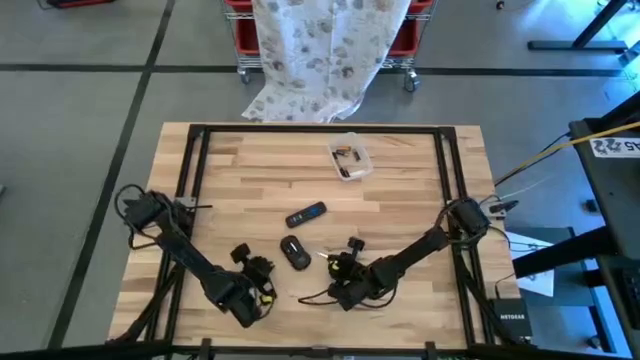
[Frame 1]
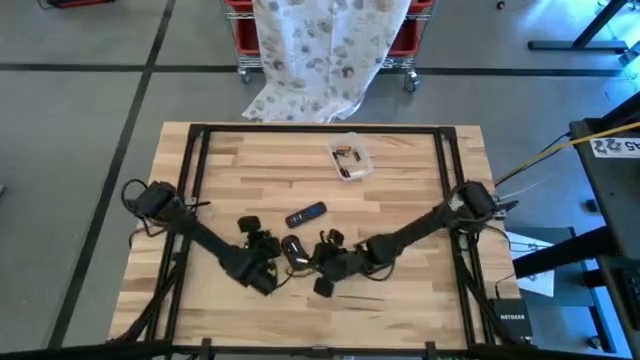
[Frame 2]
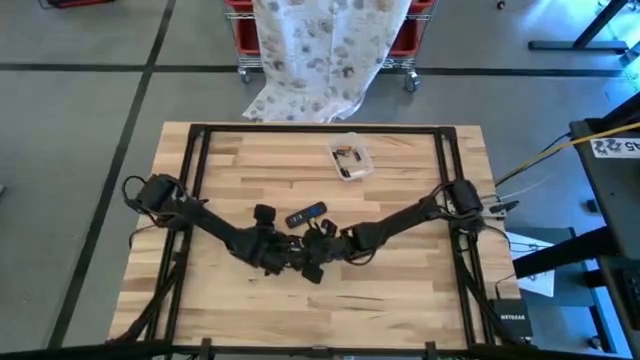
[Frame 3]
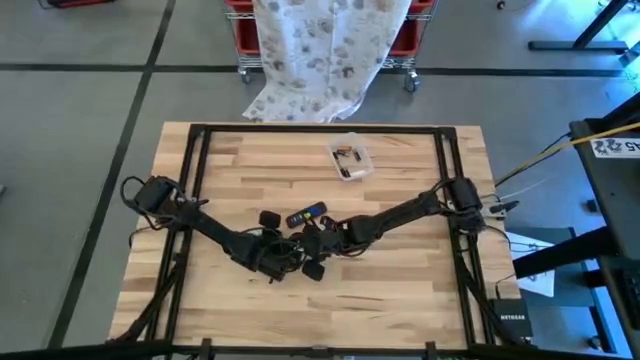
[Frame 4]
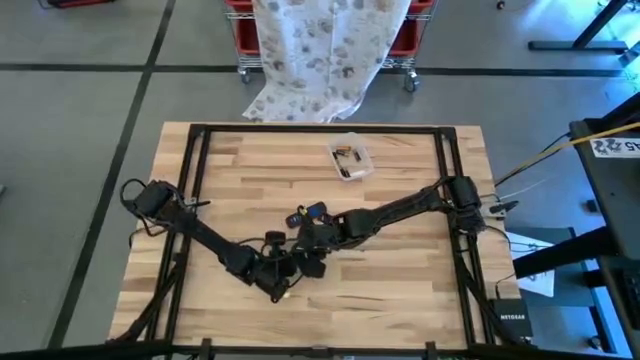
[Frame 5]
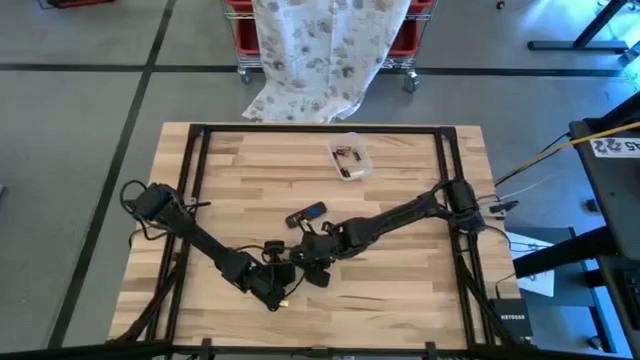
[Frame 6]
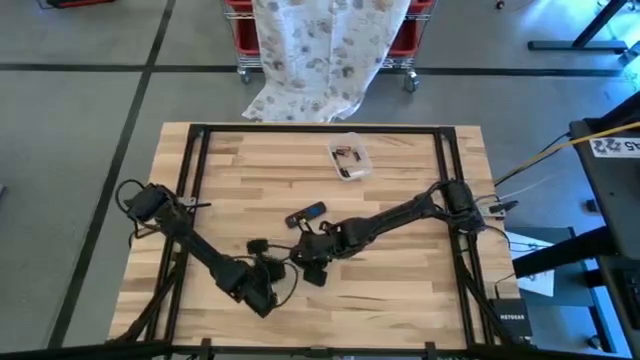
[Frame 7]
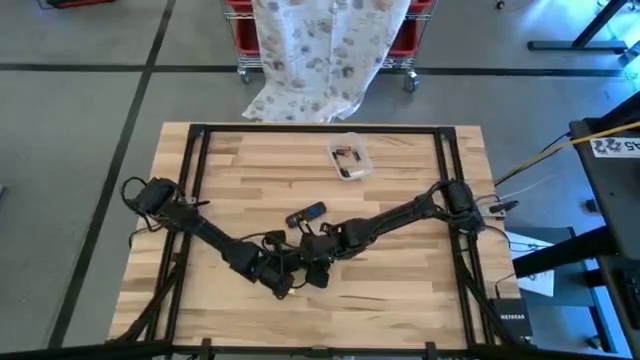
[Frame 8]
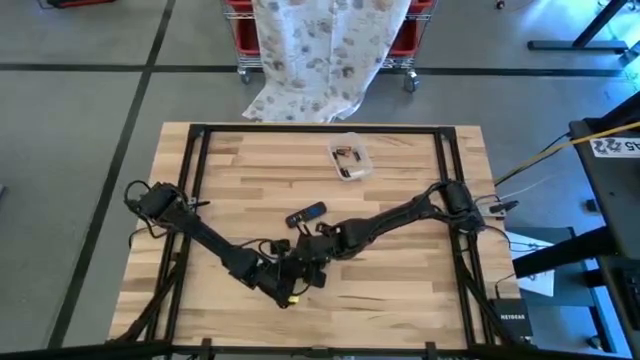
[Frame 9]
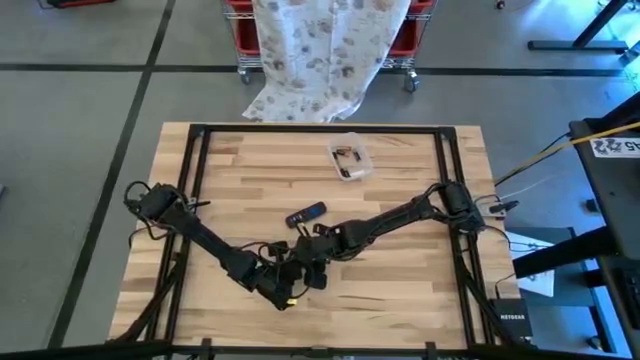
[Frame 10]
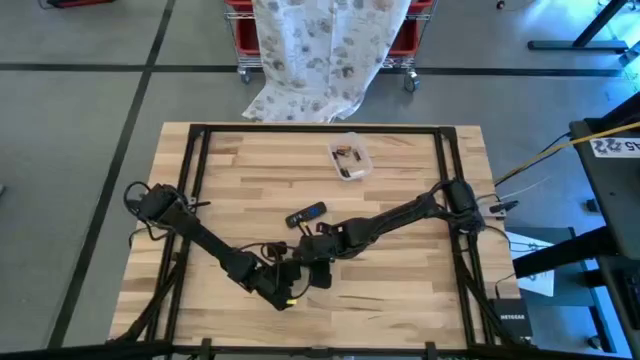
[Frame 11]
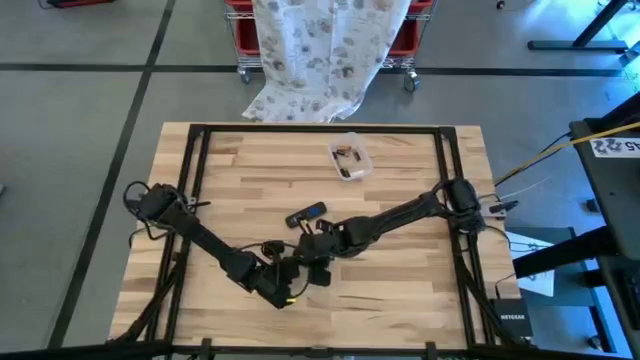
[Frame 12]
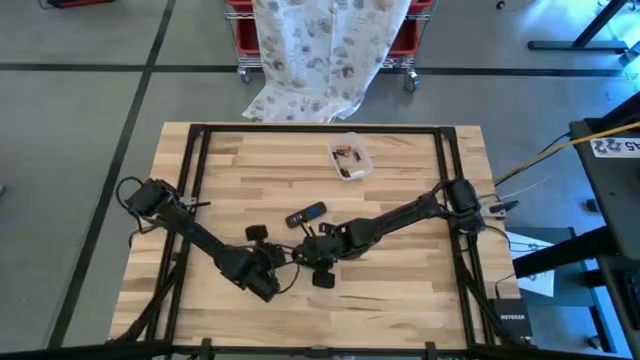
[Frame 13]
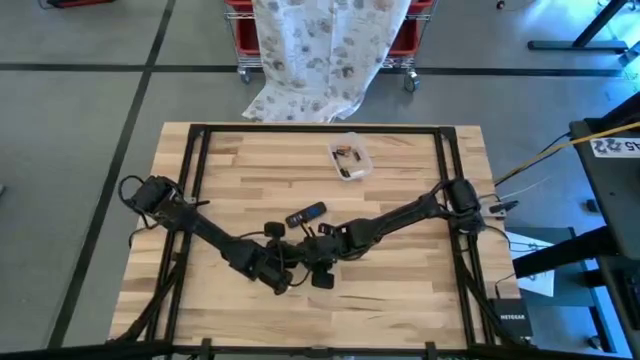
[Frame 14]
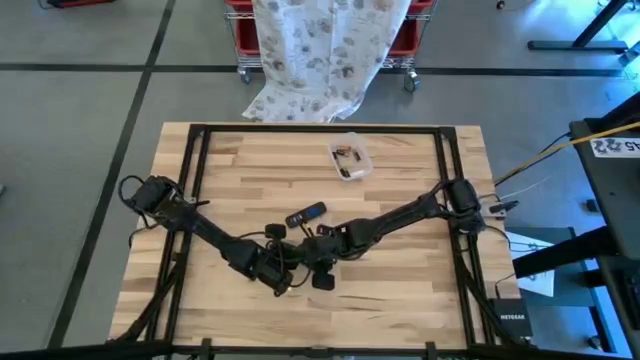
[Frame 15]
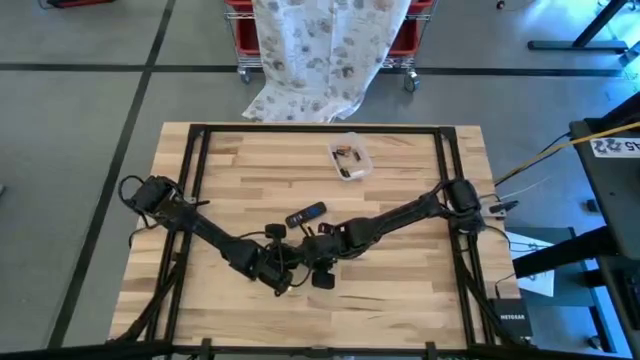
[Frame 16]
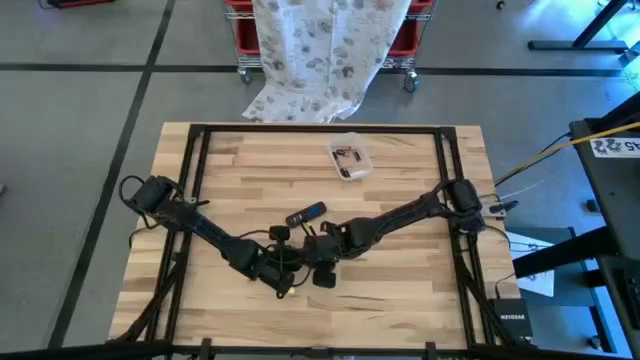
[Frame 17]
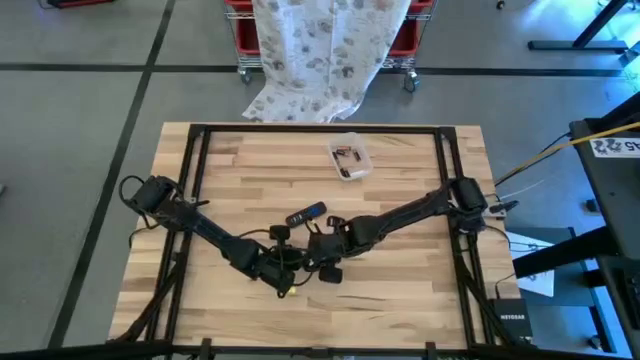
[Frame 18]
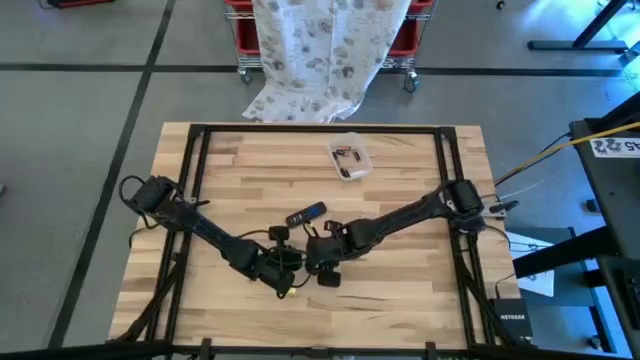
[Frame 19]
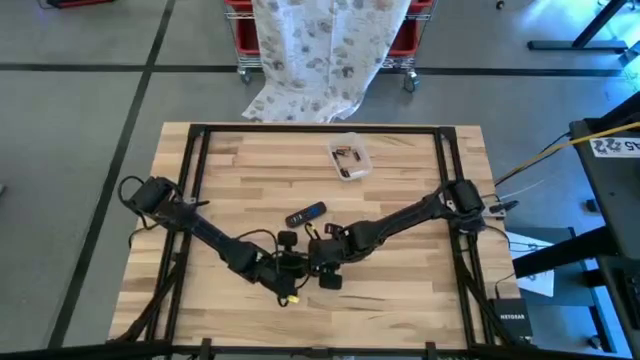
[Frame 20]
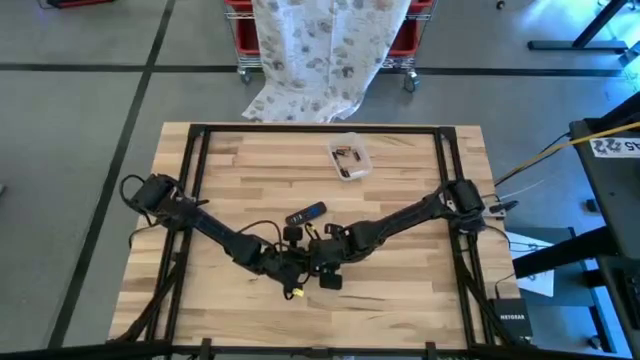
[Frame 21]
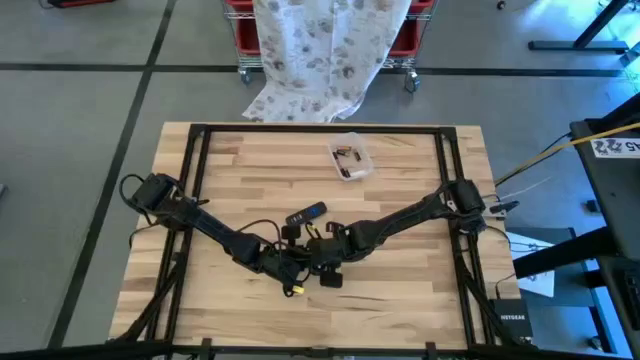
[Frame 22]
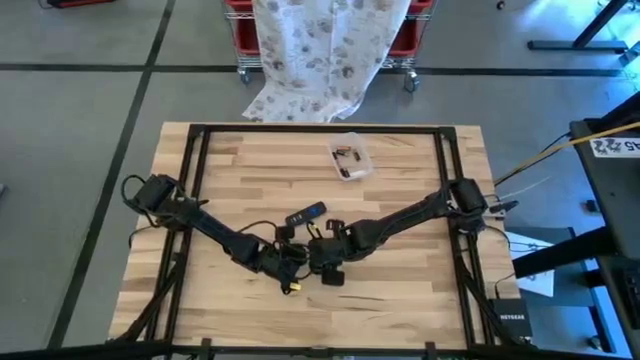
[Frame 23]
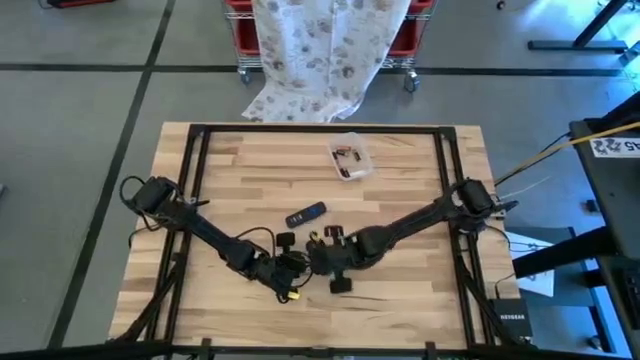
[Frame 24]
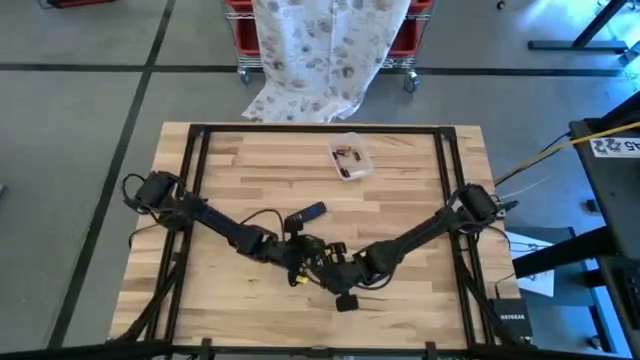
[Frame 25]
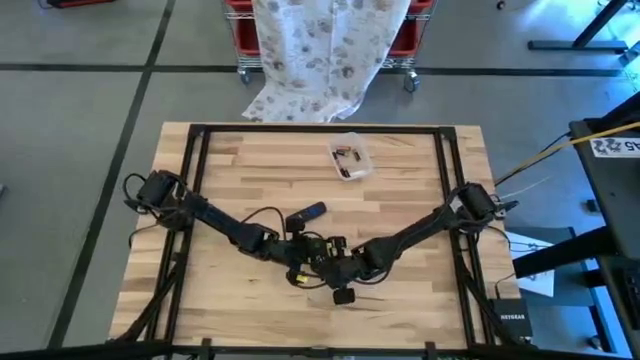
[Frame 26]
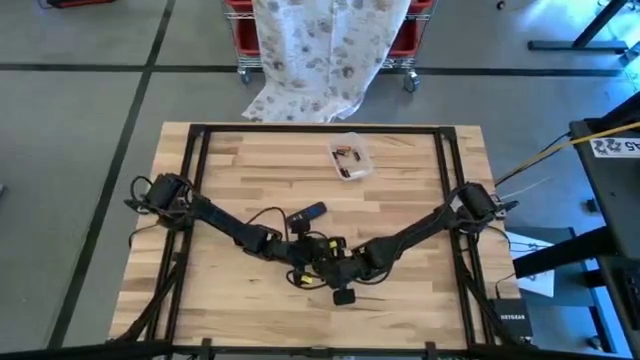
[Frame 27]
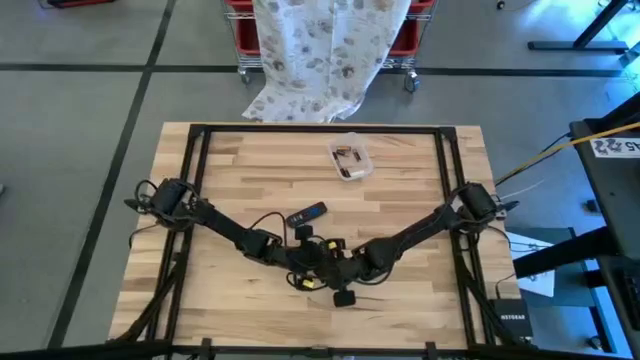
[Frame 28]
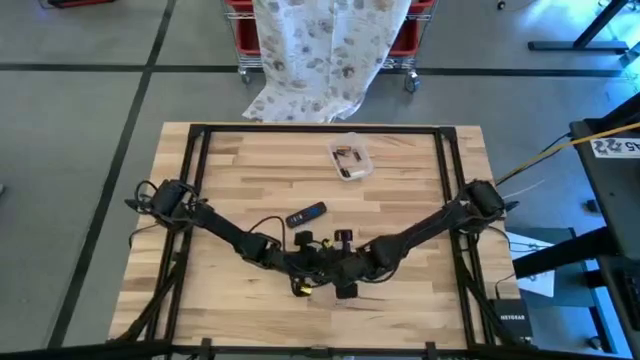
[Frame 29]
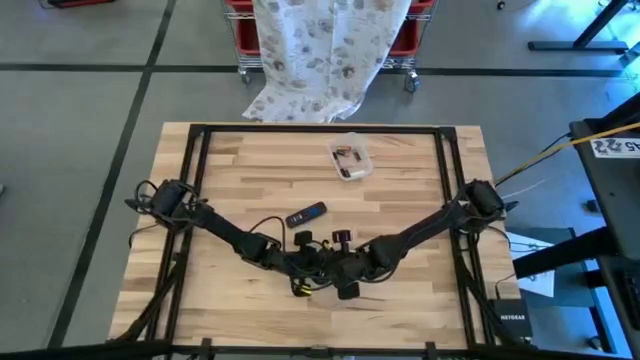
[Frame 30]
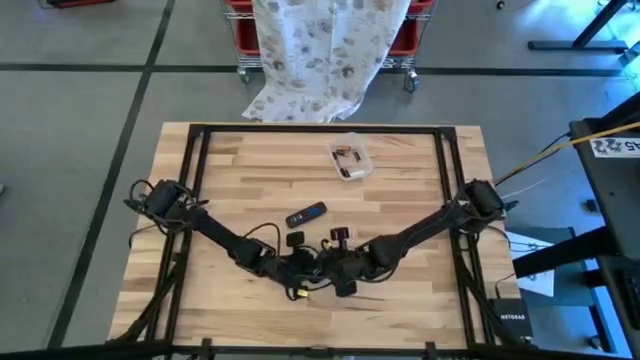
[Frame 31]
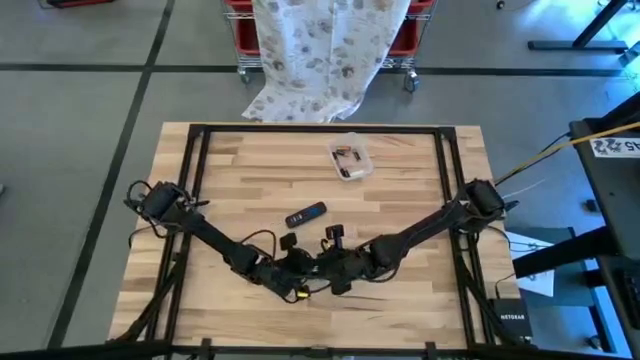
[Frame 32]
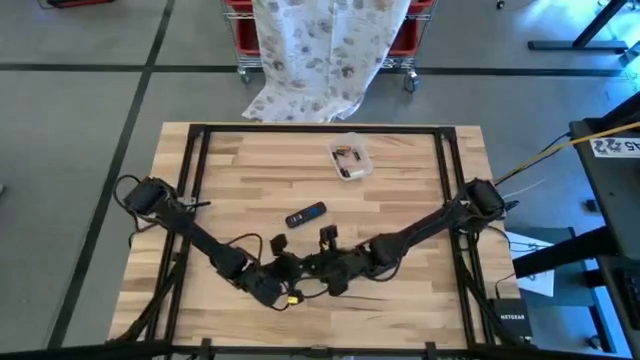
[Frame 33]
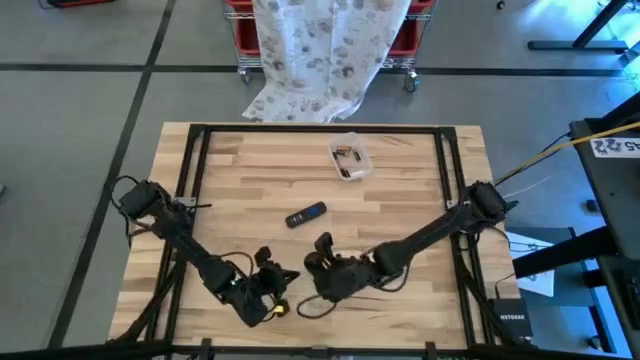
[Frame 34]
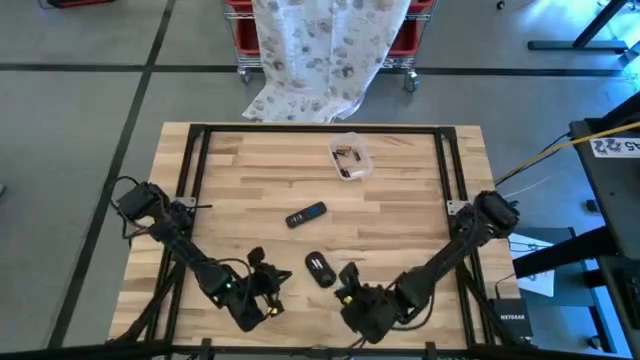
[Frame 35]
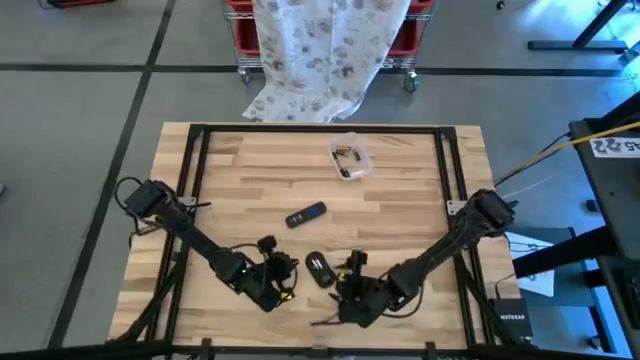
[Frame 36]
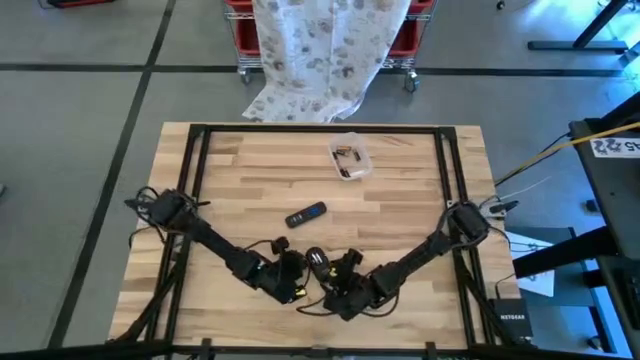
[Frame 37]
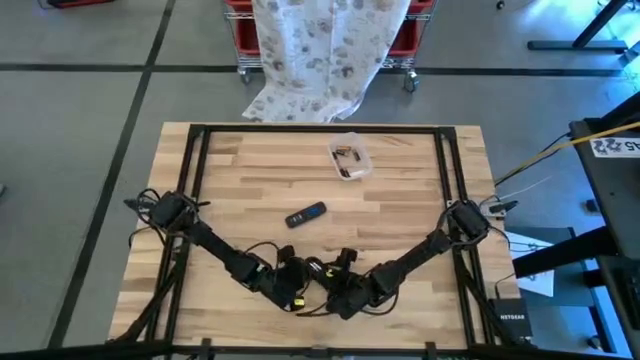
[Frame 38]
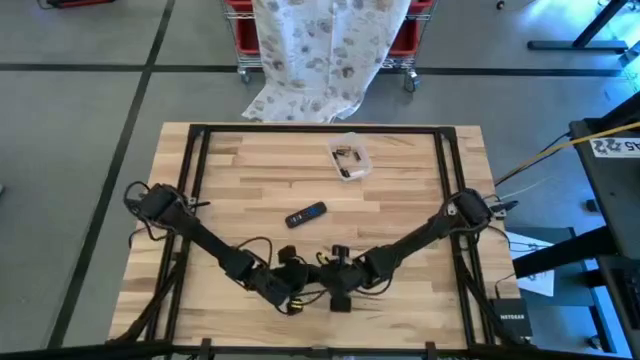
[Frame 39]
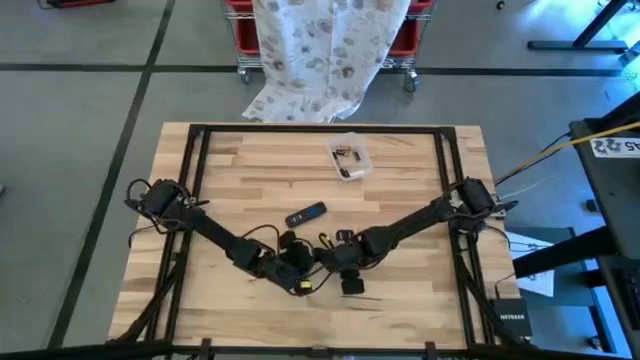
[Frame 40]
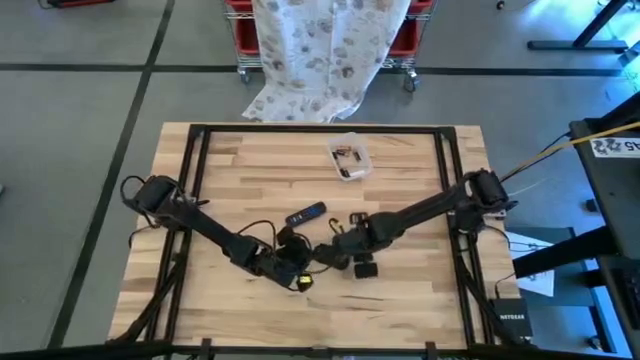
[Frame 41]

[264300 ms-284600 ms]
Task: Insert battery
Insert the white battery into the wireless mouse
